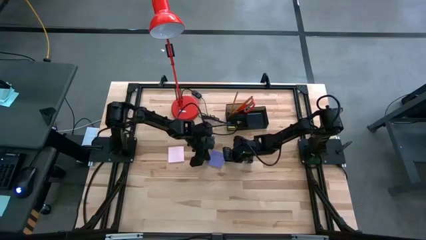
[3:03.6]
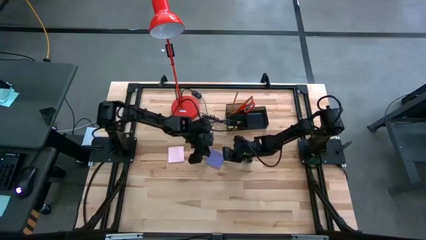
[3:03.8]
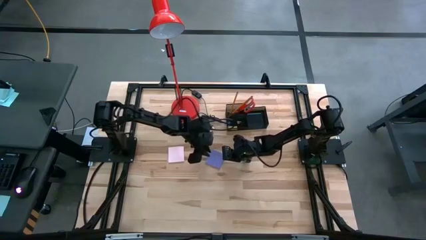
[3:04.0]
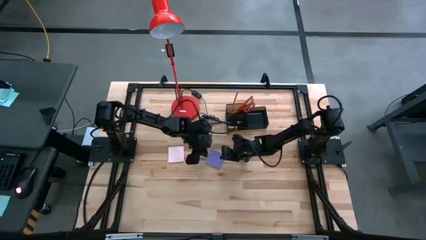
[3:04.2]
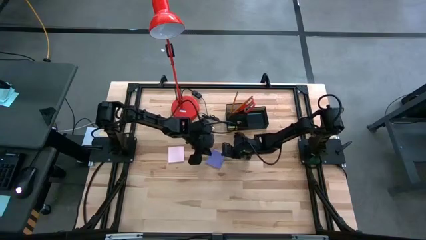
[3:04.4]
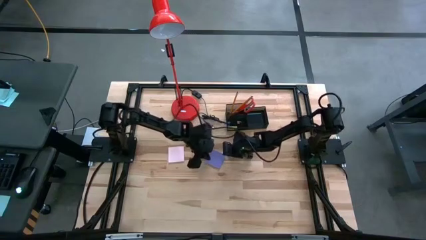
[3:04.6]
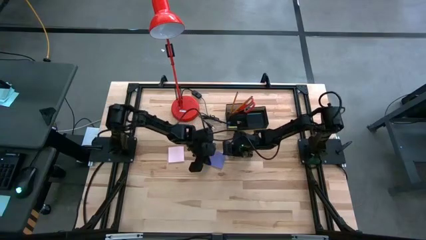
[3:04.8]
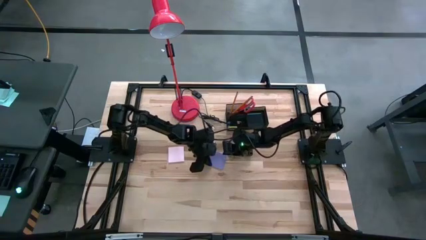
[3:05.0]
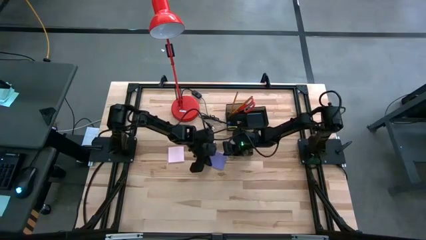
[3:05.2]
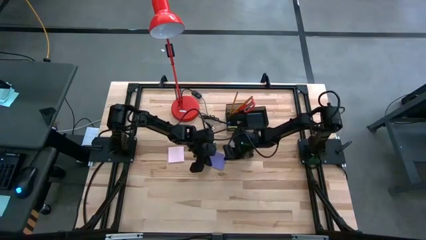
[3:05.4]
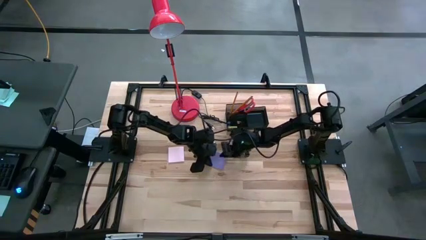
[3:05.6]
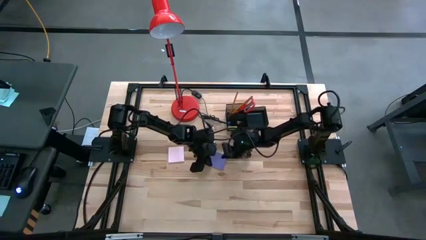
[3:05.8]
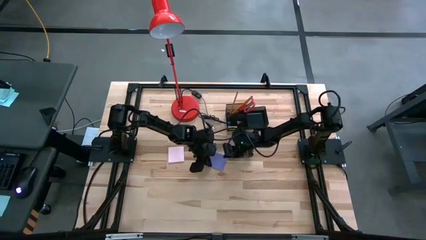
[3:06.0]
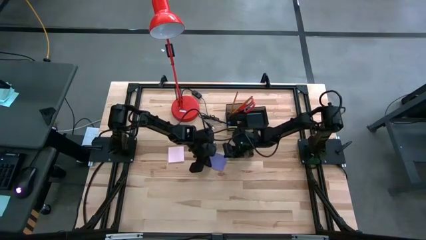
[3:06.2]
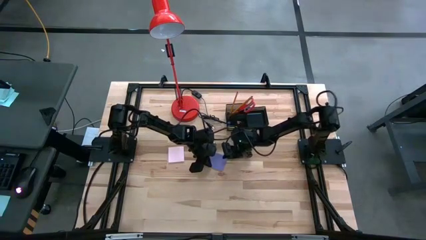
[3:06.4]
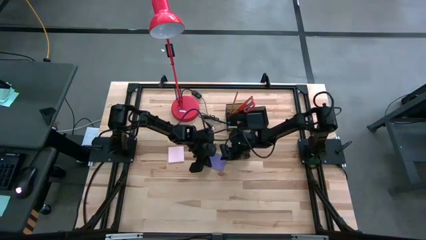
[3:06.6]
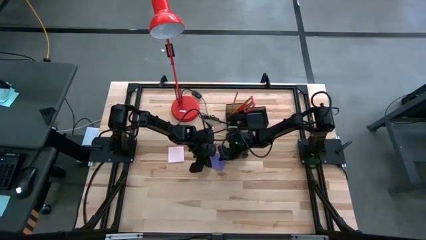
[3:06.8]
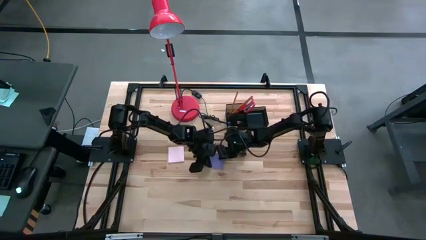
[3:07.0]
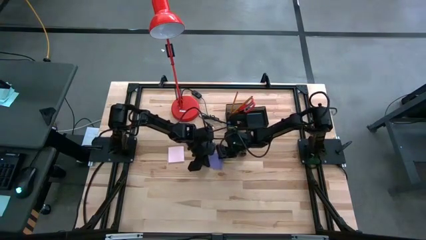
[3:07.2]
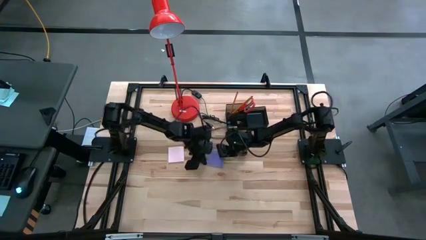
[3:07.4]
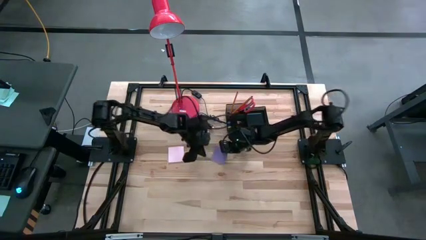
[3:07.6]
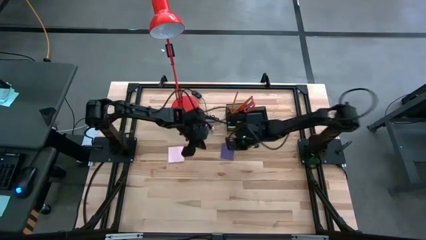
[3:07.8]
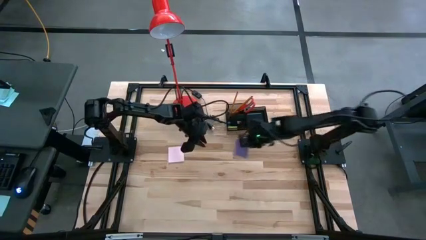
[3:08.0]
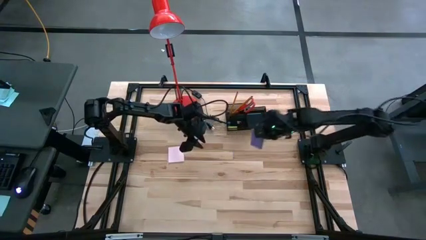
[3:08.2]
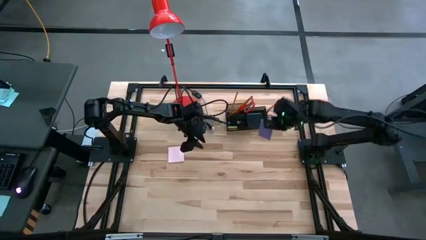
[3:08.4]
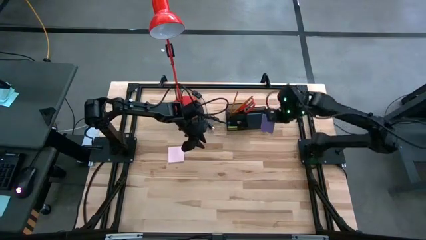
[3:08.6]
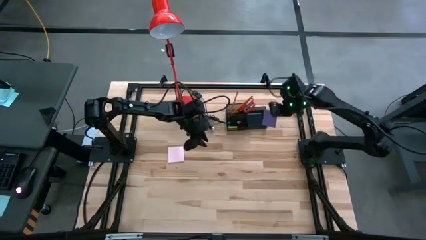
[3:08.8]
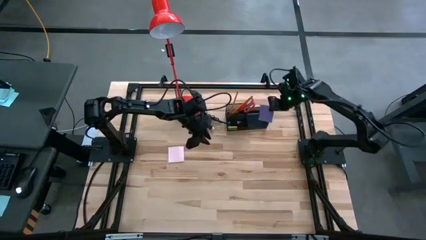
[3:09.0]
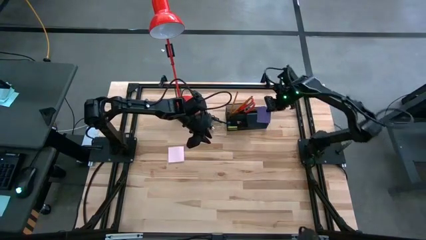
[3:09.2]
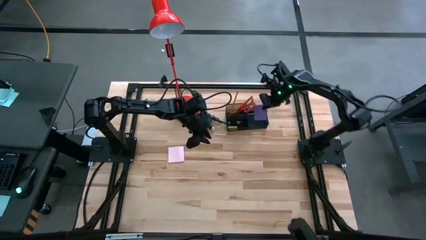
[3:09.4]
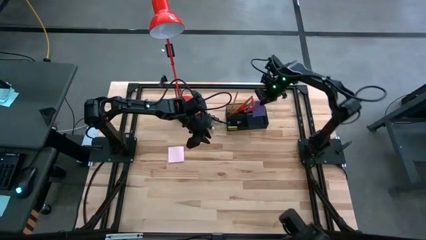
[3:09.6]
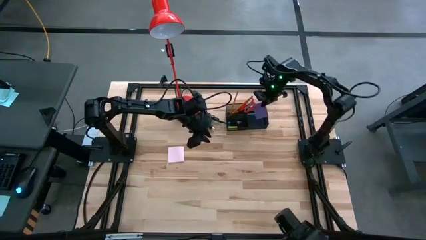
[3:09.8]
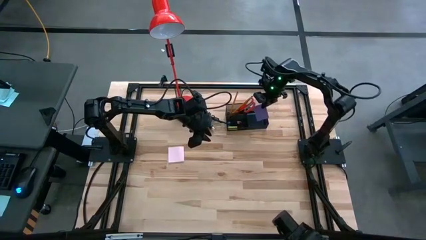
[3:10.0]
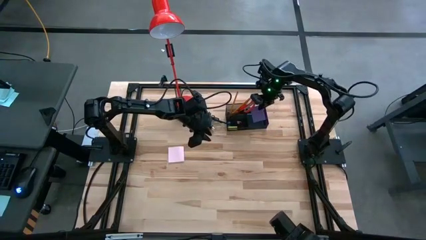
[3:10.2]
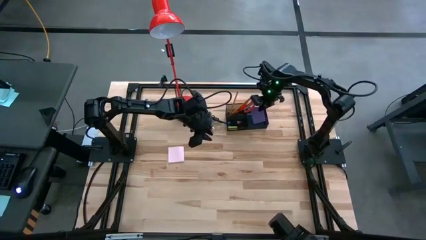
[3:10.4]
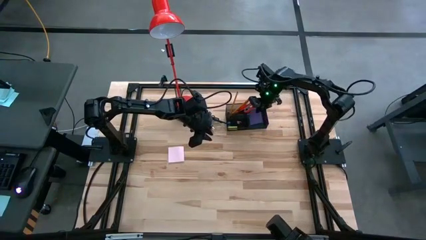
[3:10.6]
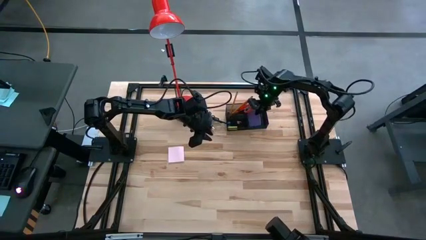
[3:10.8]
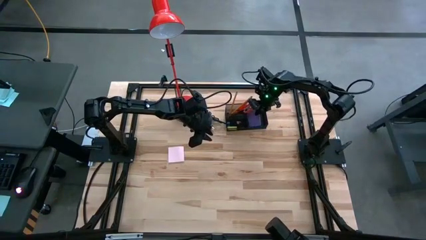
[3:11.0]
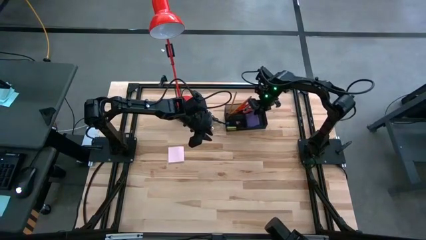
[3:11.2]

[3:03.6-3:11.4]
Task: Pick and place office supplies into organizer
Put the purple sticky notes into the black desk organizer

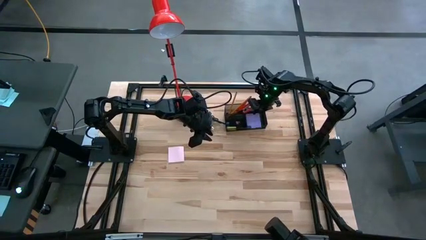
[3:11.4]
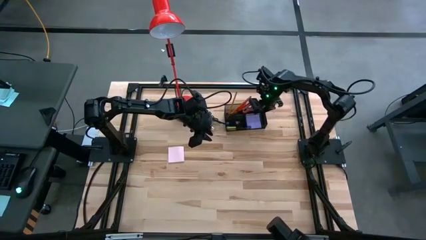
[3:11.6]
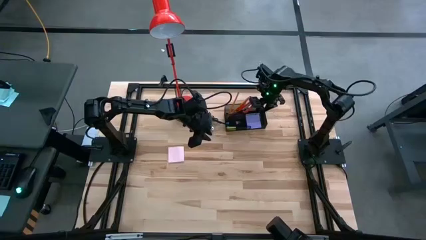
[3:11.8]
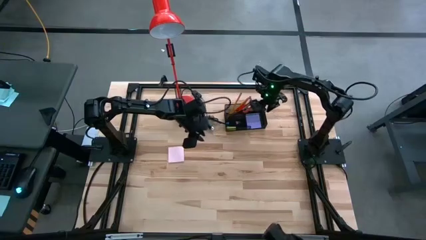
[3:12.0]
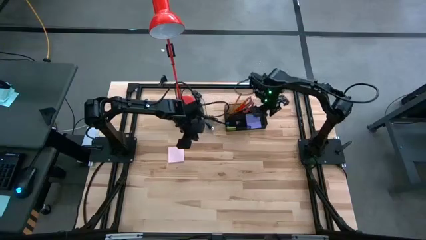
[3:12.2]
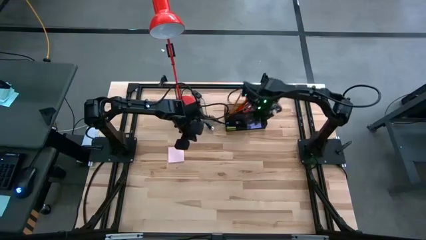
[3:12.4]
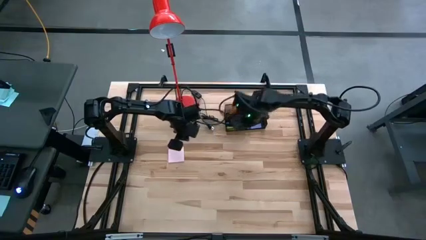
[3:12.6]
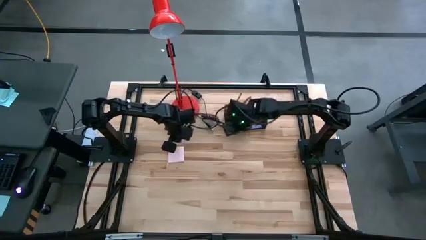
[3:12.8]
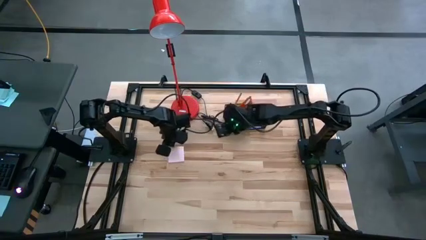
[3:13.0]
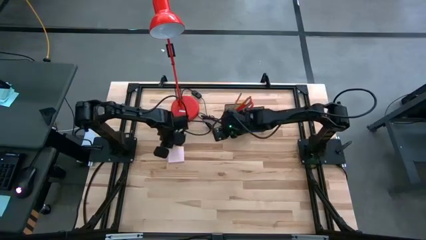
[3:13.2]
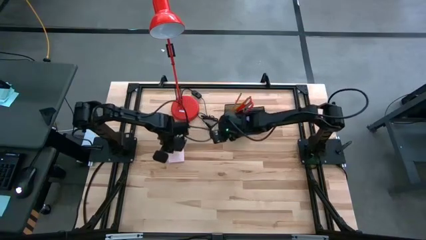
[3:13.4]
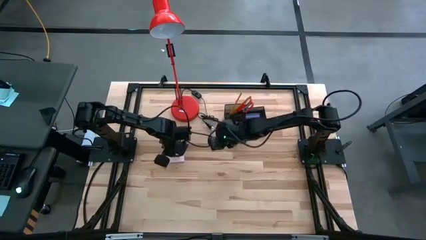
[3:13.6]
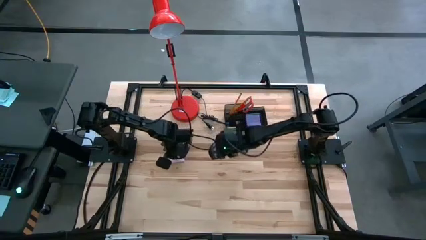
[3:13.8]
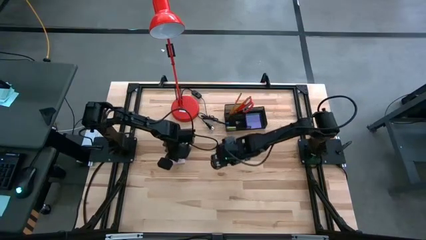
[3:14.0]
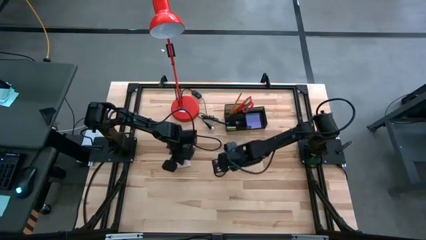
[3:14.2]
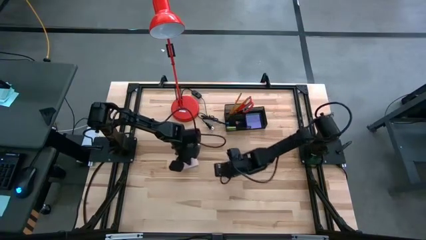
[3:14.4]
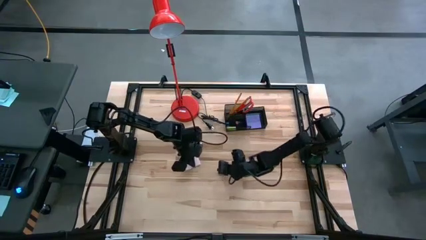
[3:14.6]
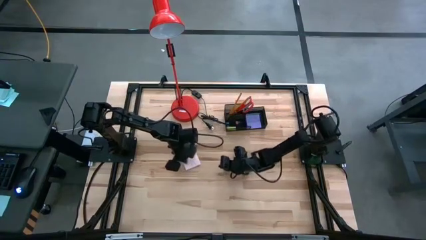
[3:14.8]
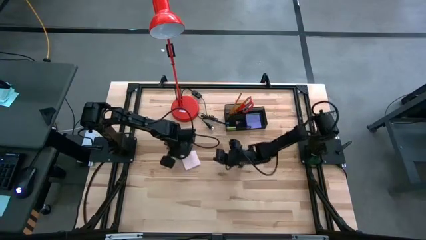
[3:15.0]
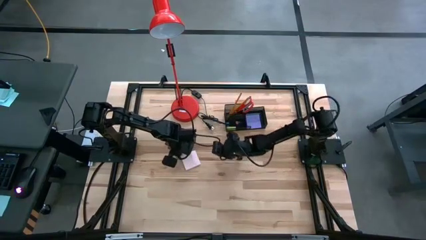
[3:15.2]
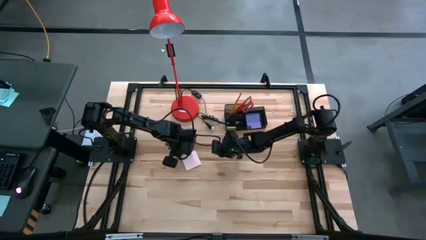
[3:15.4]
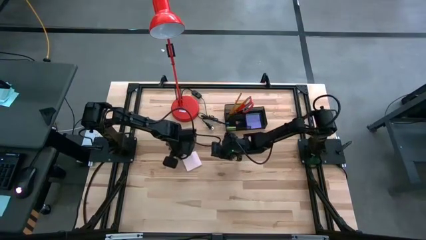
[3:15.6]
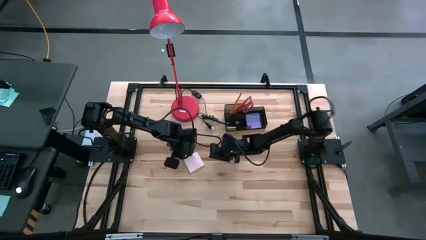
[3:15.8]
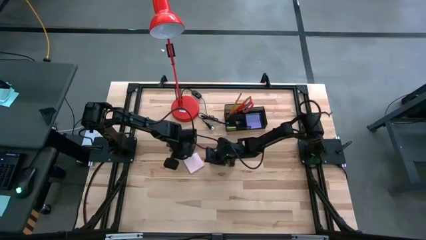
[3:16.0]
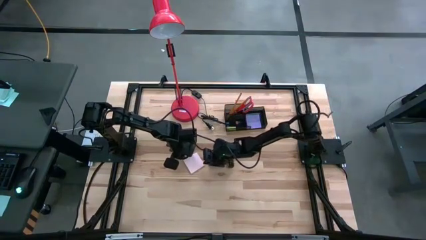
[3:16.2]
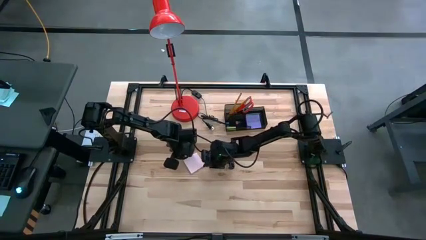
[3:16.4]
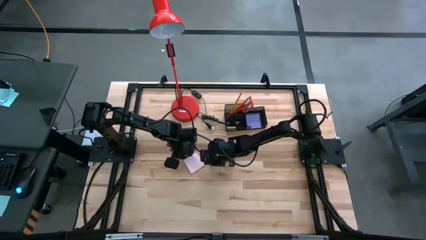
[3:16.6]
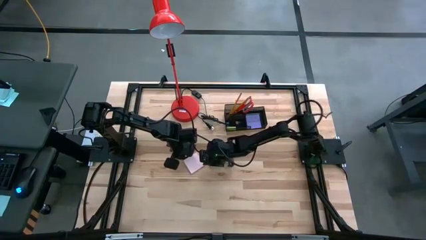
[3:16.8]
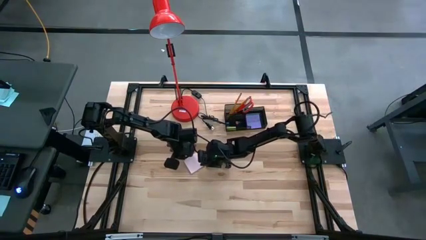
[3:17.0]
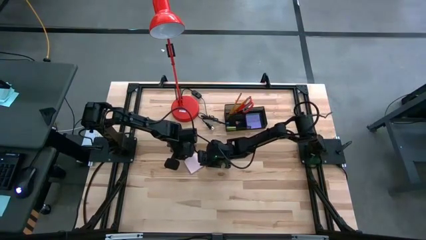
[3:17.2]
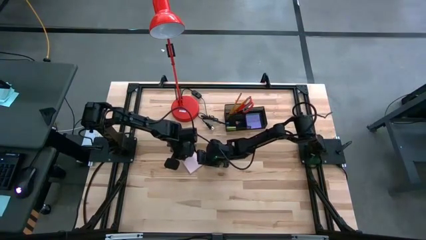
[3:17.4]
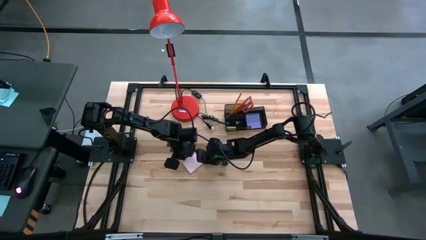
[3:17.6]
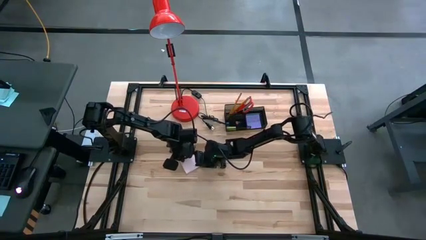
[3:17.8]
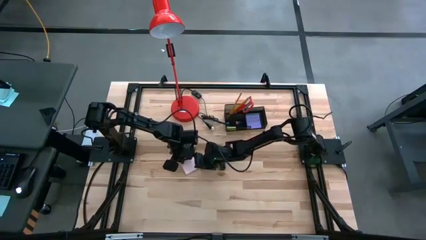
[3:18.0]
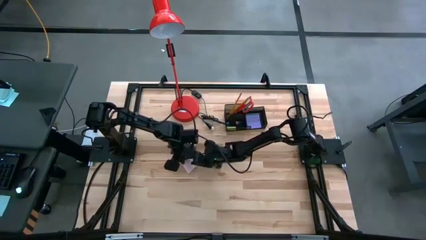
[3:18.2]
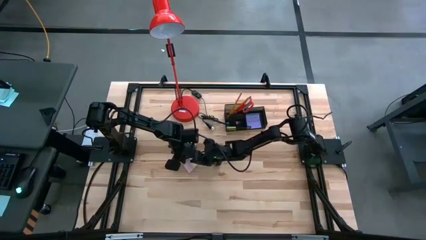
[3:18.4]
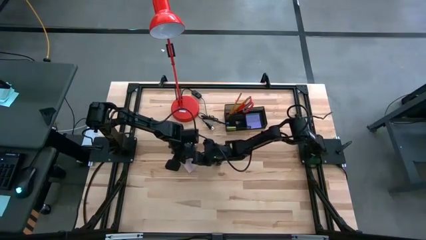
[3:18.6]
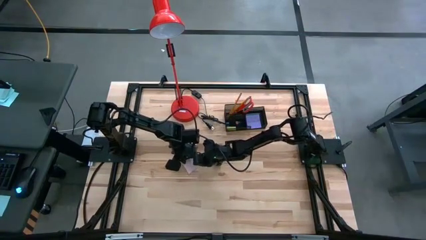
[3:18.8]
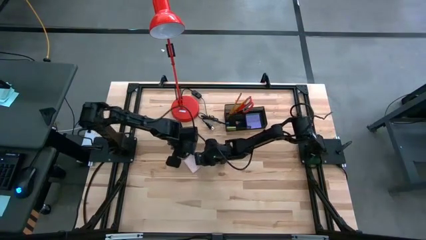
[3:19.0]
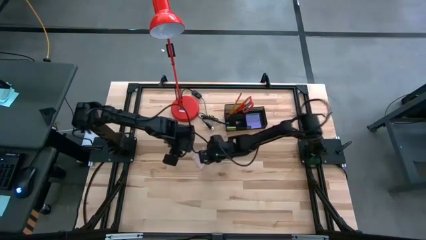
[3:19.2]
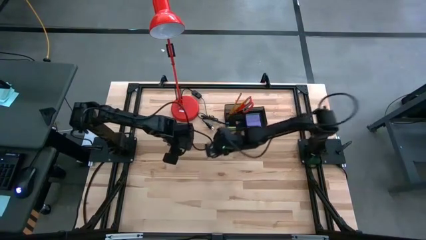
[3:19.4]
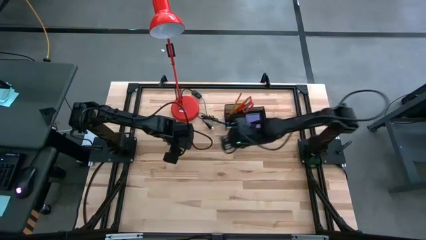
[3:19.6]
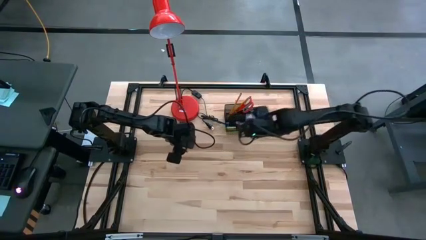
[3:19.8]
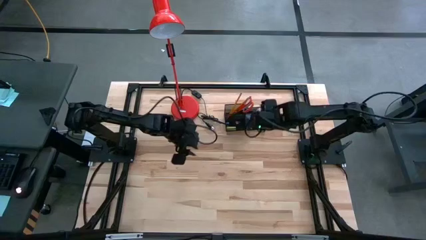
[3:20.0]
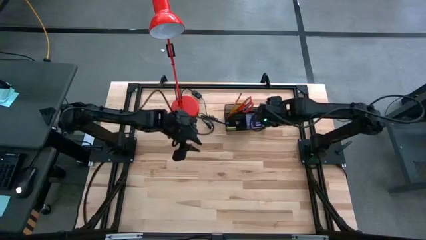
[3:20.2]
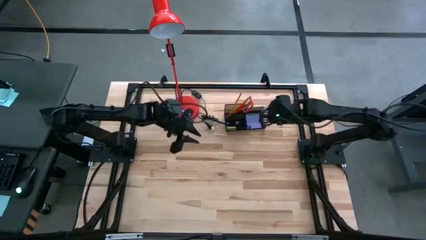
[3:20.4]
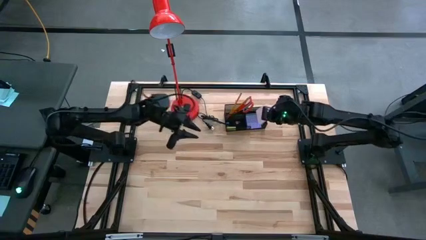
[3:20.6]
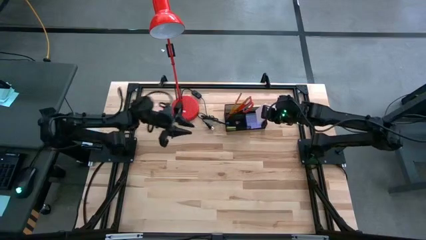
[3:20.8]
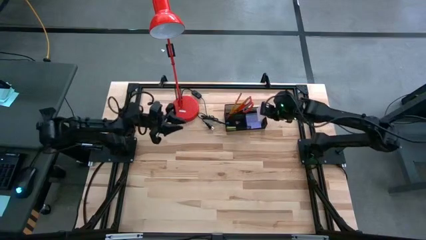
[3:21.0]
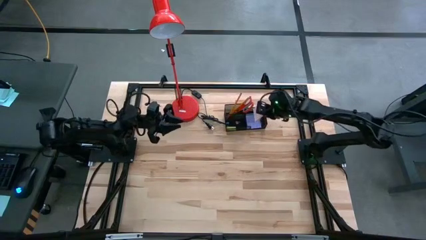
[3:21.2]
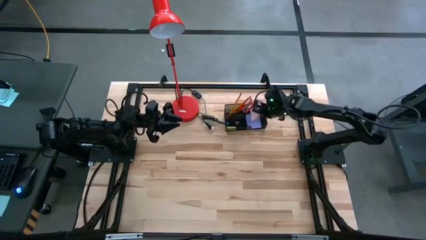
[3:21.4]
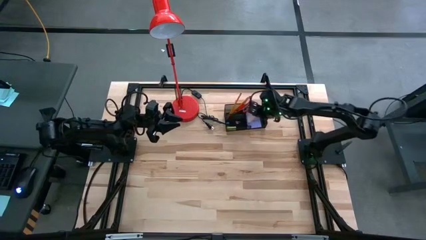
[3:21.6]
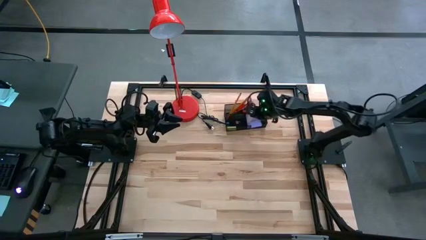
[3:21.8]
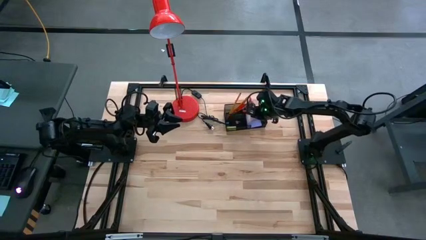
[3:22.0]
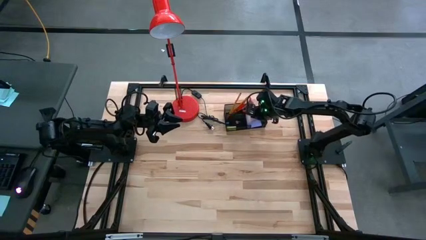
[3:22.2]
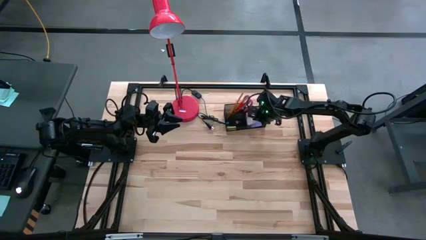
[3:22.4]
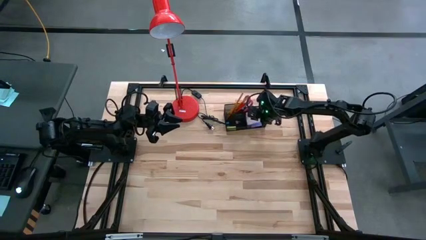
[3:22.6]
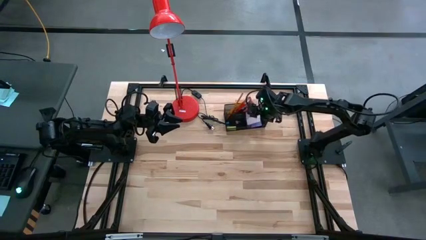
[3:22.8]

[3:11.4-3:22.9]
Put the pink sticky notes into the black desk organizer
